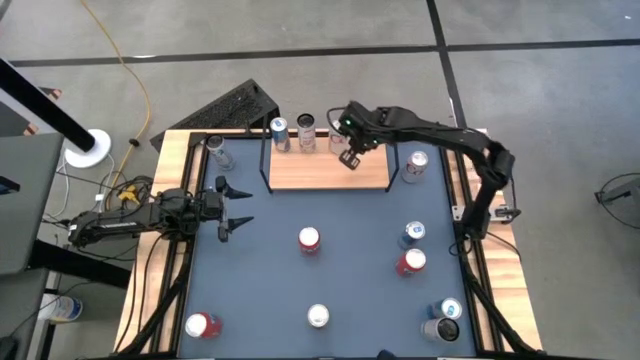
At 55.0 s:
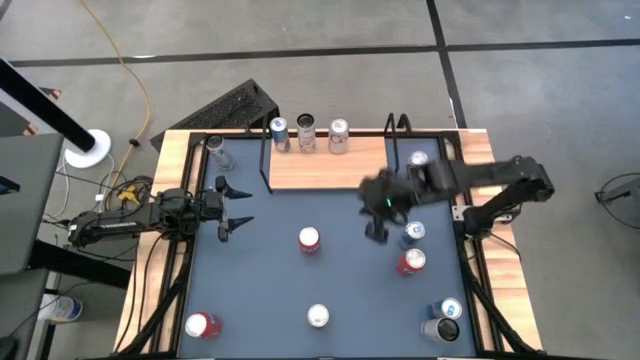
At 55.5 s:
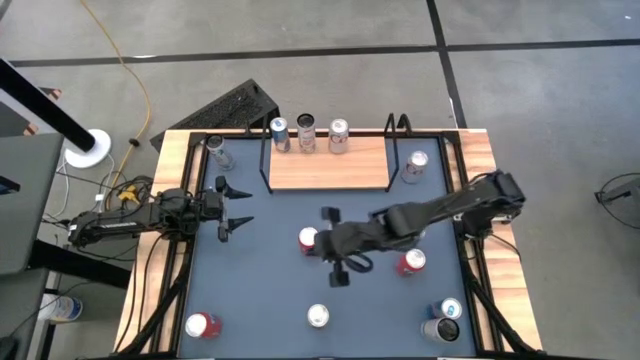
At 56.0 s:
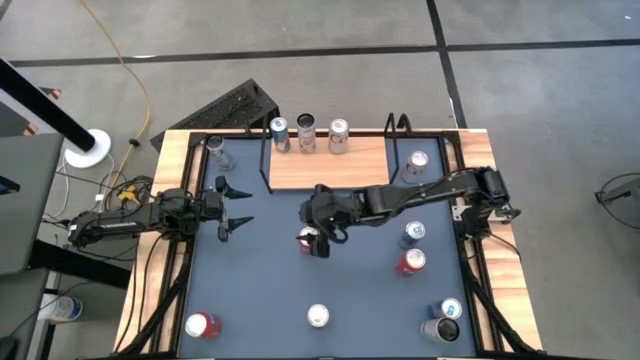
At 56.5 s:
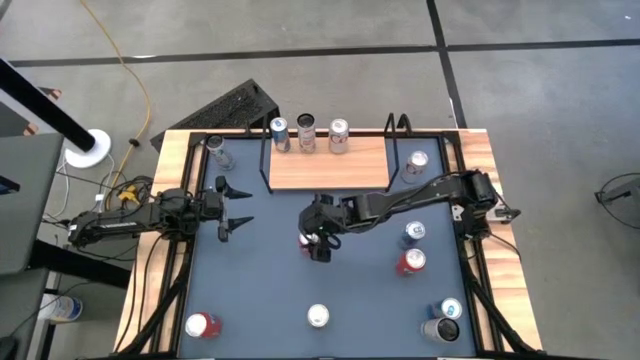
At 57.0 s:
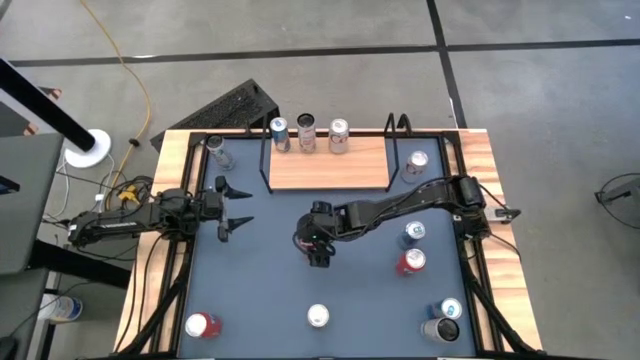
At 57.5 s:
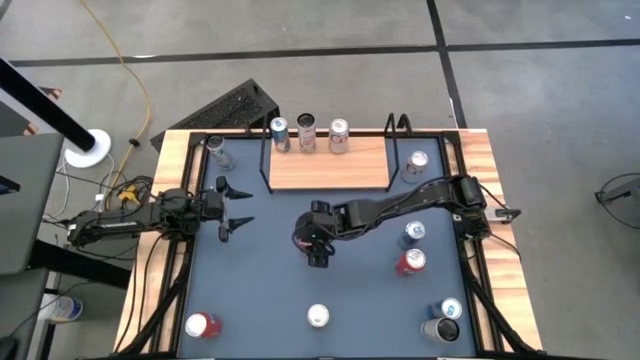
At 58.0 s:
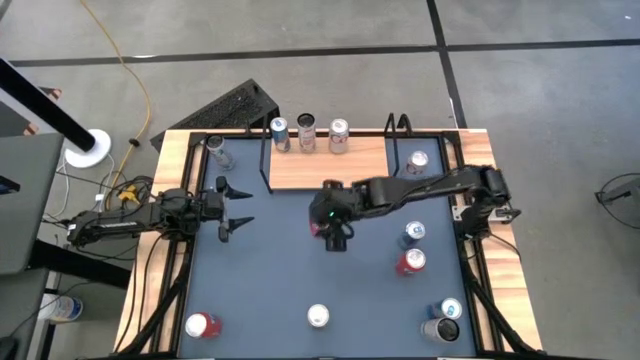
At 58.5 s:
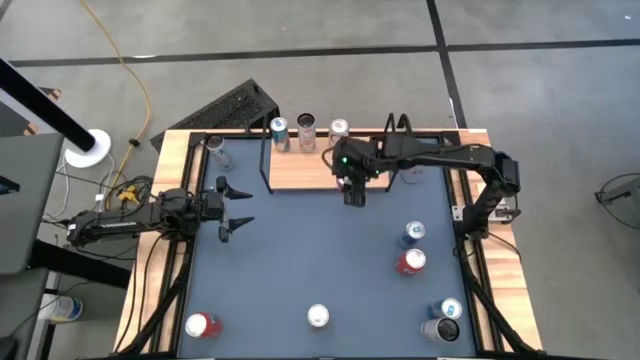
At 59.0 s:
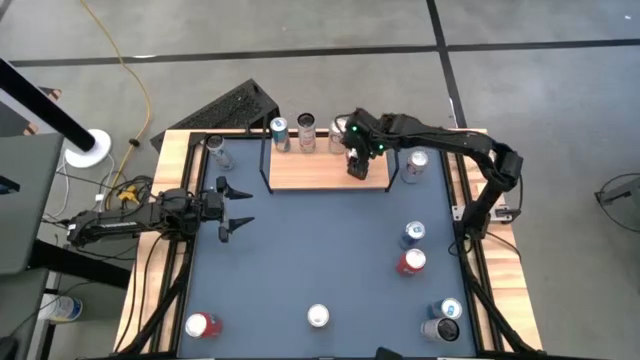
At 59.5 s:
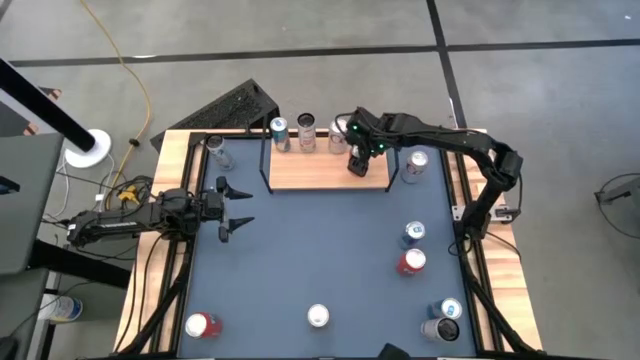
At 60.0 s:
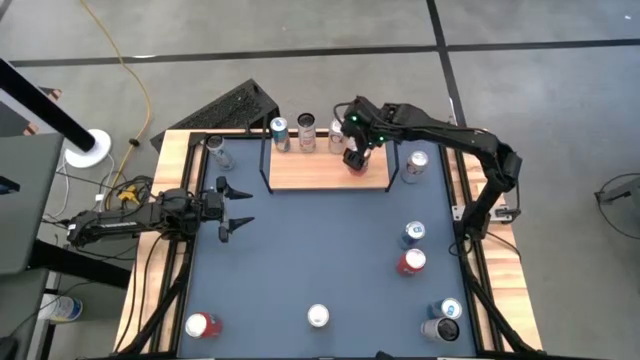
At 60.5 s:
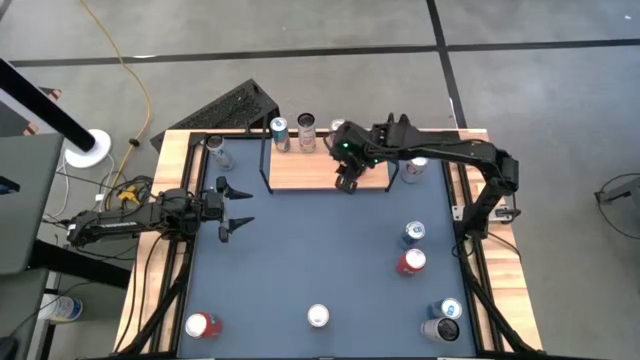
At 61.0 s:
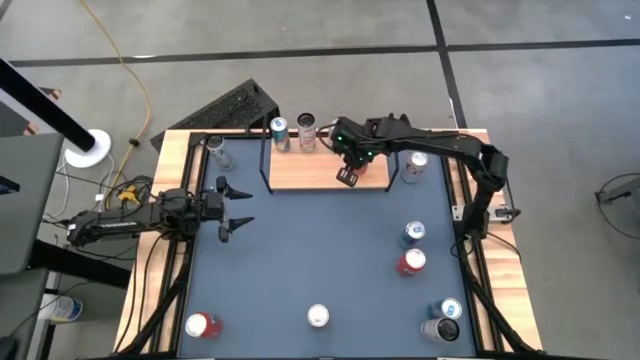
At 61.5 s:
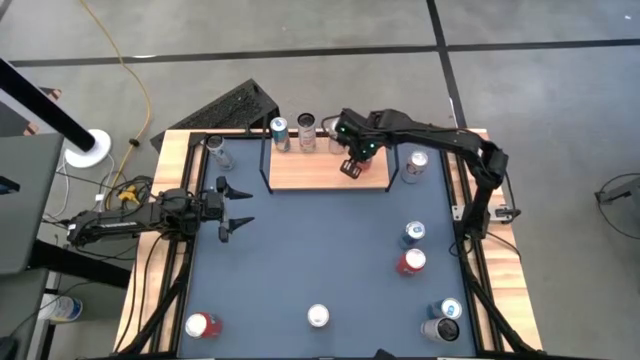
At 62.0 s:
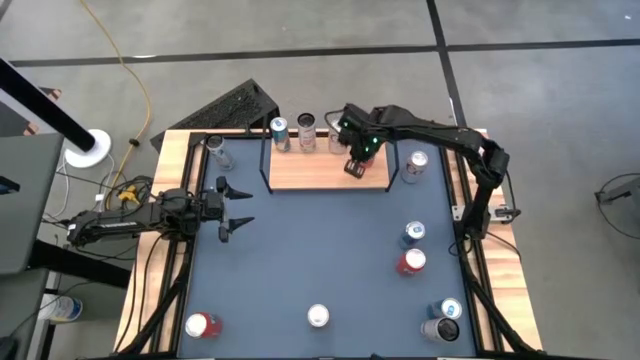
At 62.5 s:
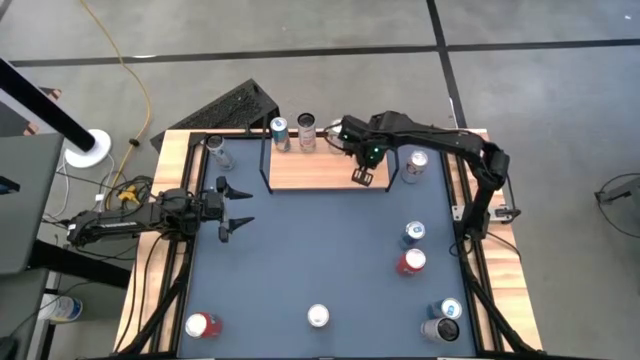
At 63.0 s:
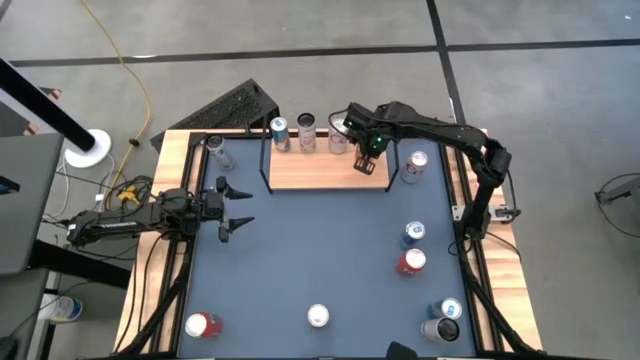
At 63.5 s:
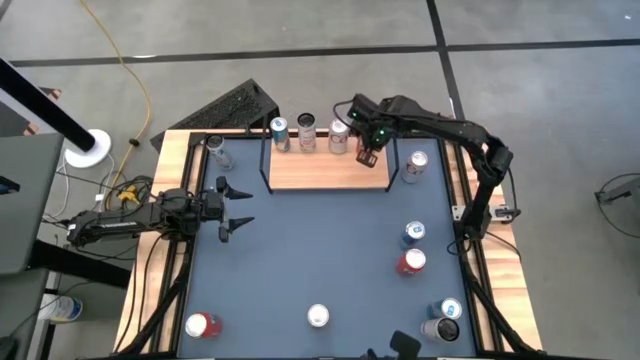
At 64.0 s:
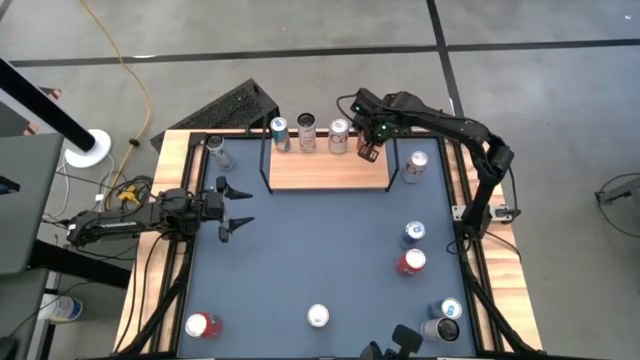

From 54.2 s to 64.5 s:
Task: Place canned beverage on shelf
Put the center orange soda can onto the shelf

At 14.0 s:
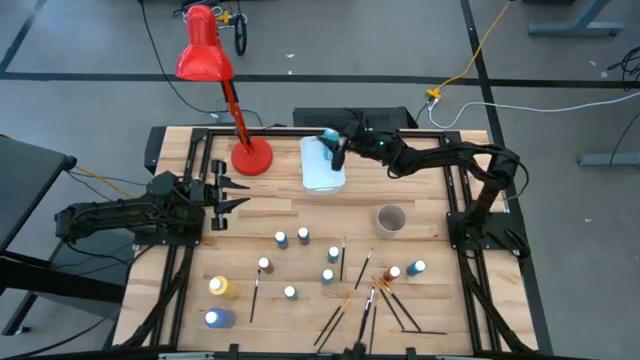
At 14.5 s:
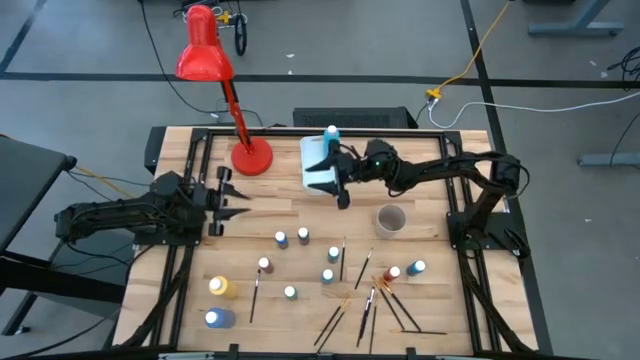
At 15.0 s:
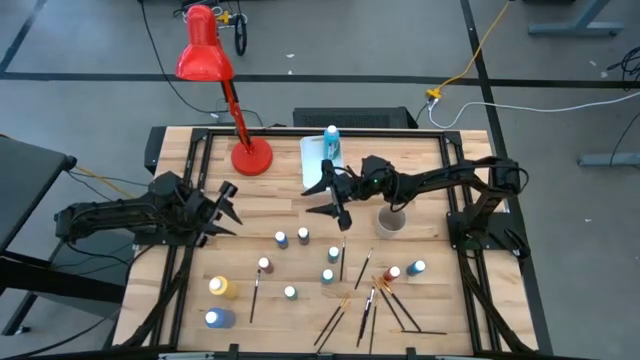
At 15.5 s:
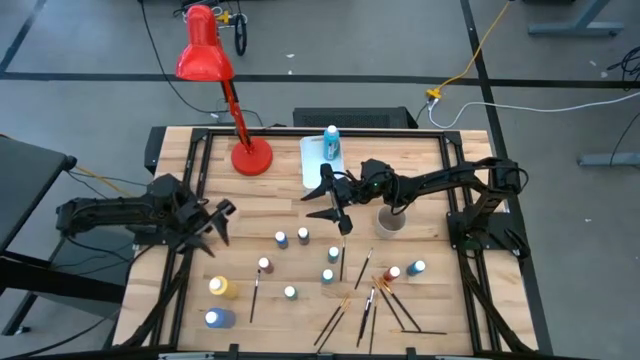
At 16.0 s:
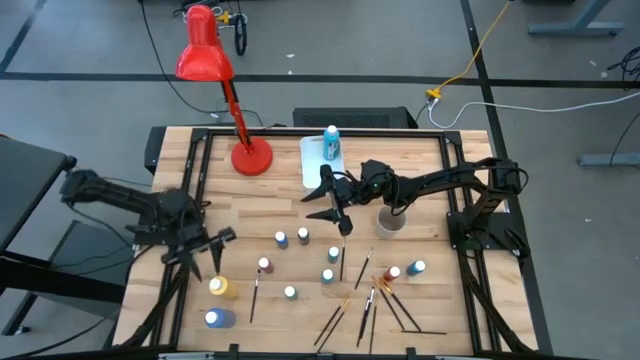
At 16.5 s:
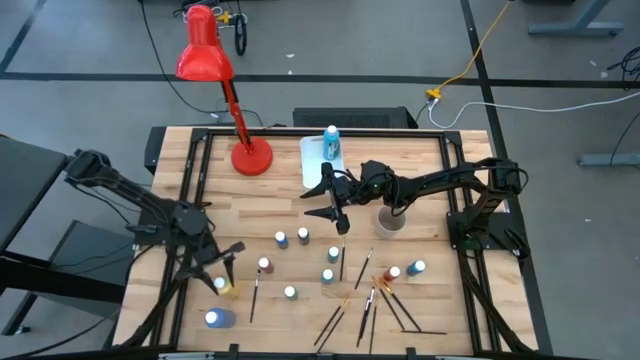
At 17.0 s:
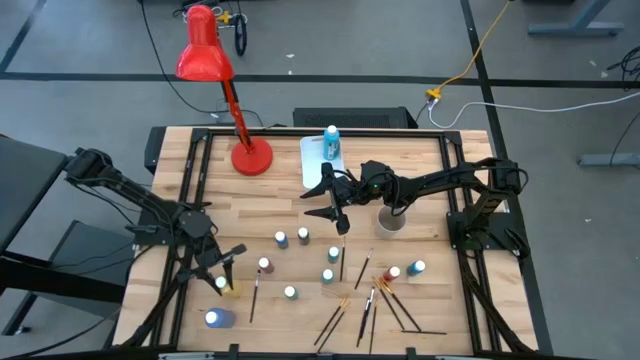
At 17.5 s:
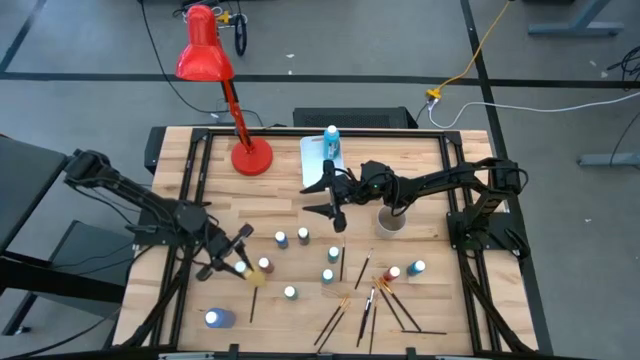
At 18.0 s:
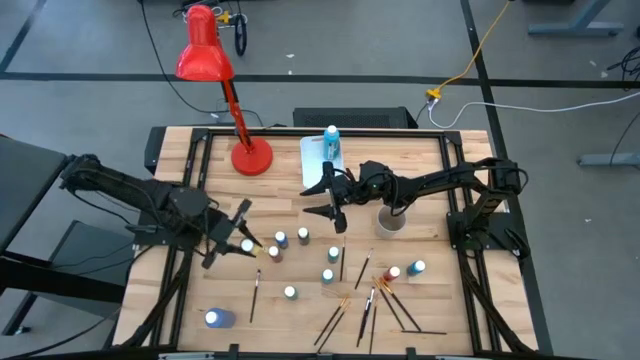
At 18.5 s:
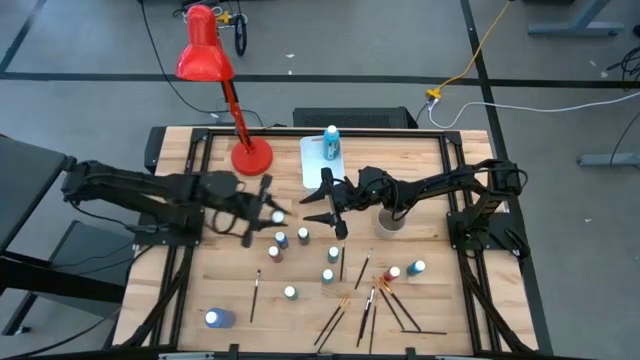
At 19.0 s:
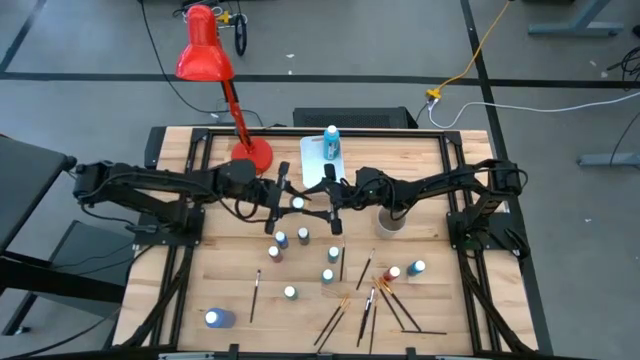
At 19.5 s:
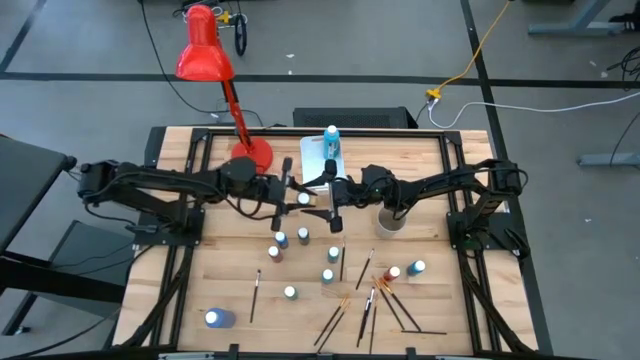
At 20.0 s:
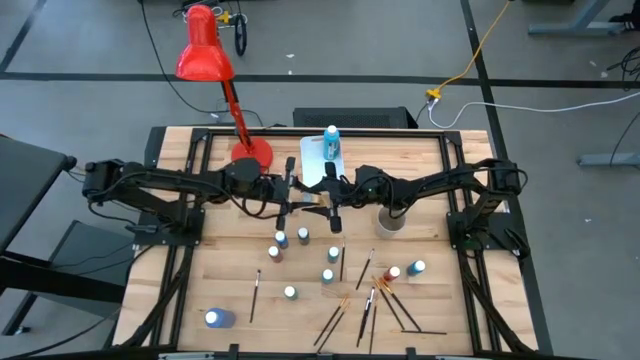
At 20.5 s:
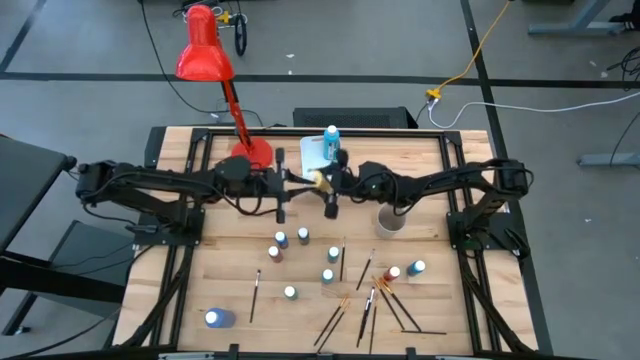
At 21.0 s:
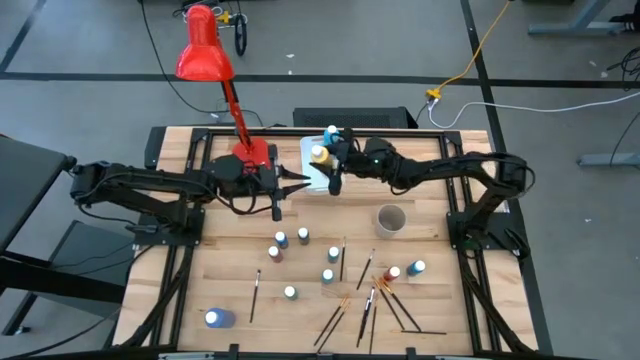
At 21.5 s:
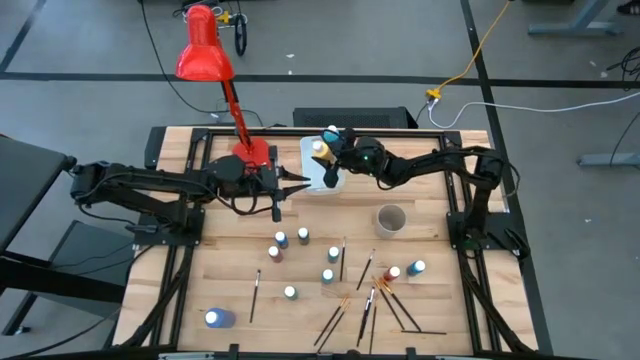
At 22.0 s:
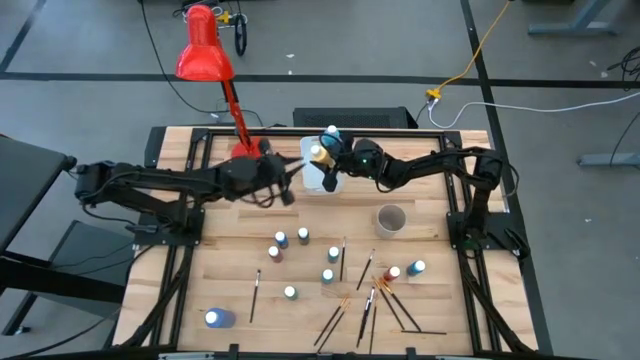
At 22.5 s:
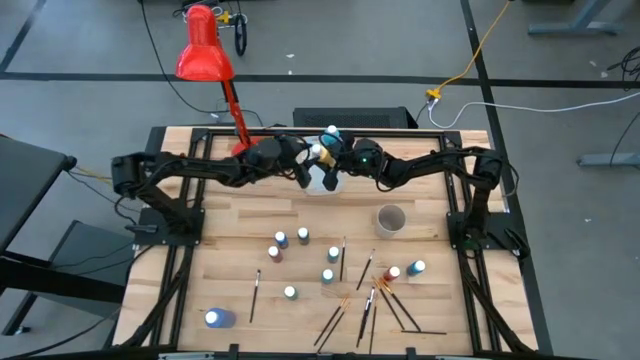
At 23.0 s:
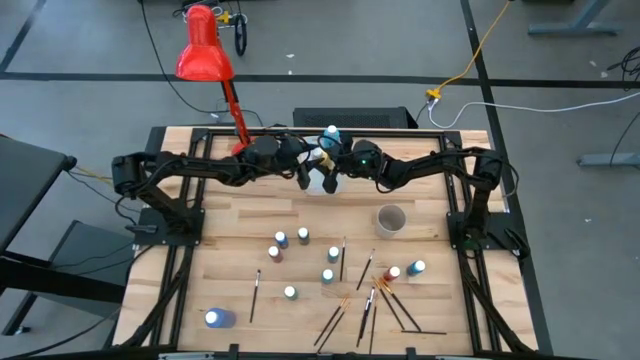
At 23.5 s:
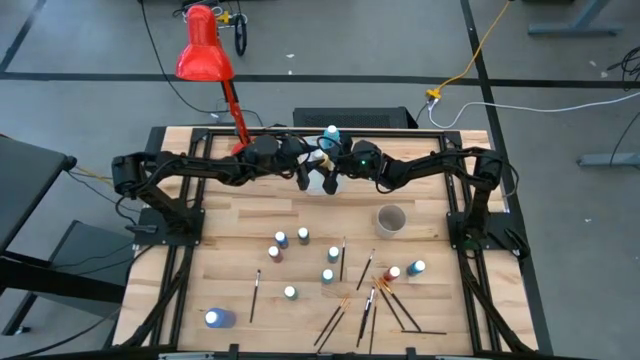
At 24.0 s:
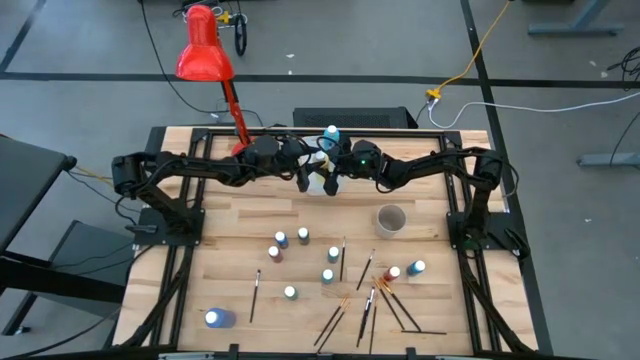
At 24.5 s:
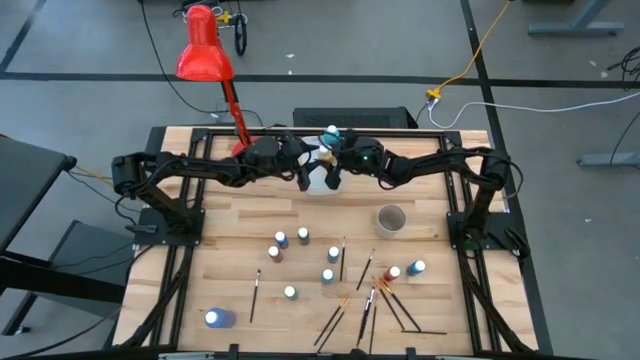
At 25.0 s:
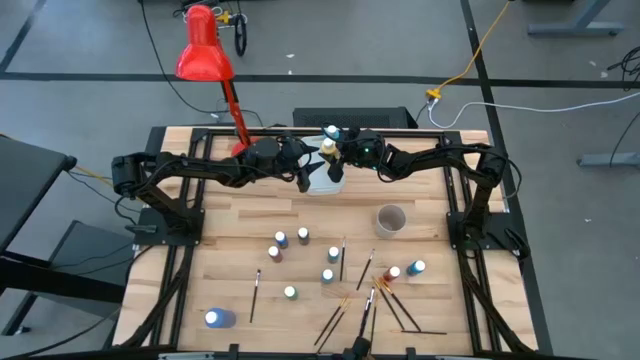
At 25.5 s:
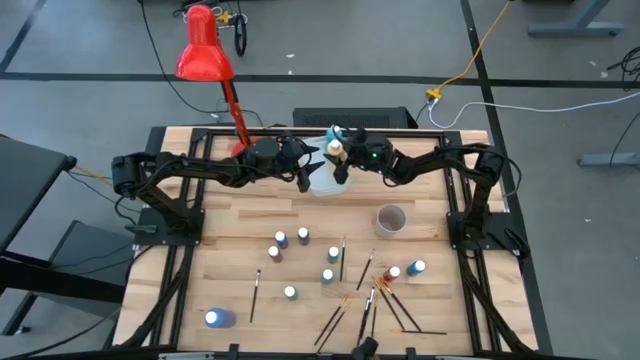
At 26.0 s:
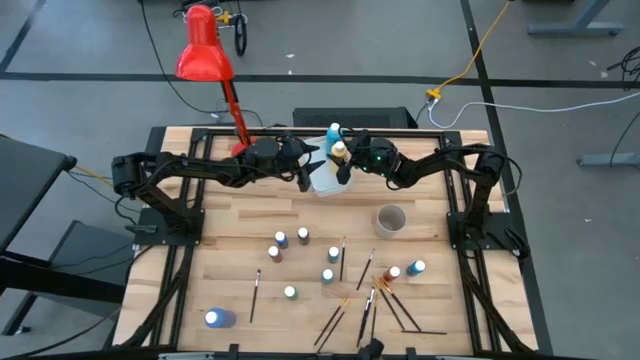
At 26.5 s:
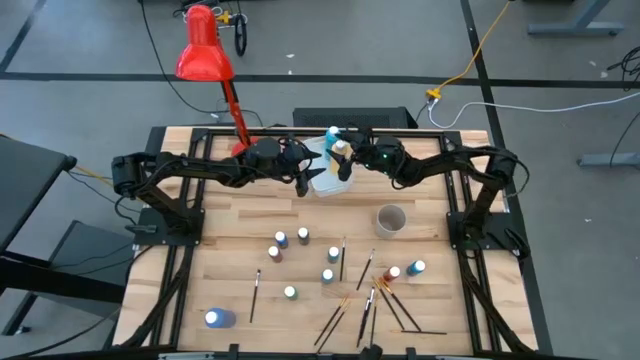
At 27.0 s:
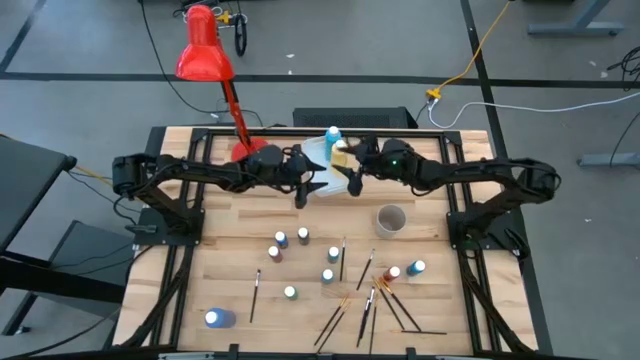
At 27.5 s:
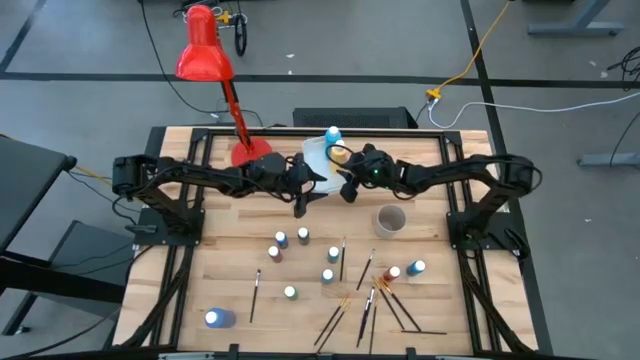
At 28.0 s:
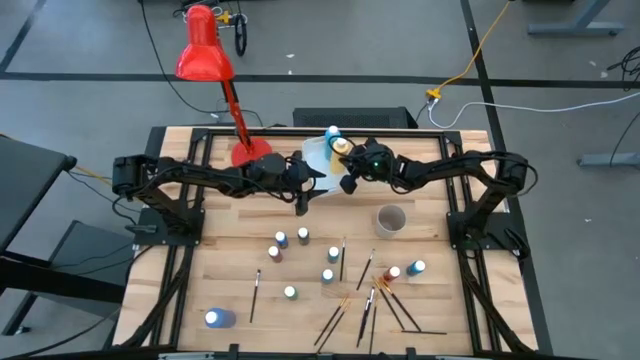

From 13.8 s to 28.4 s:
Task: Pick & Place Paint Supplies
Put the large yellow paint bottle into the white bin
